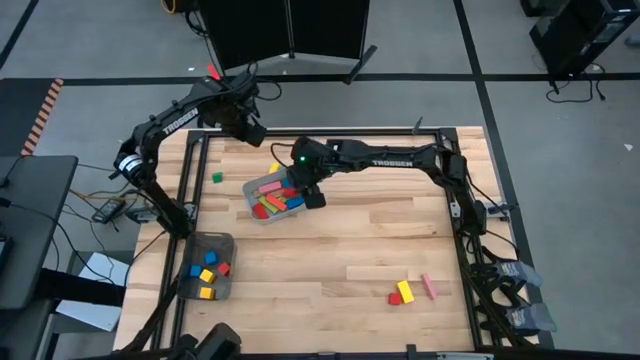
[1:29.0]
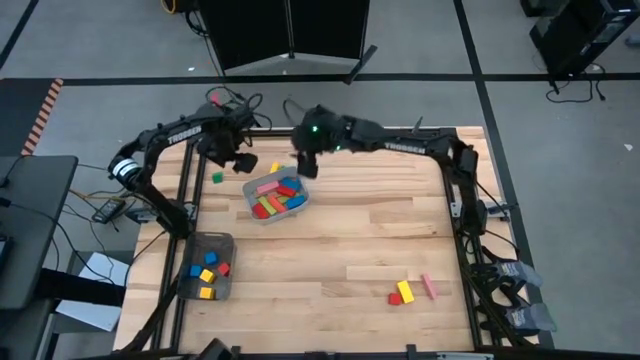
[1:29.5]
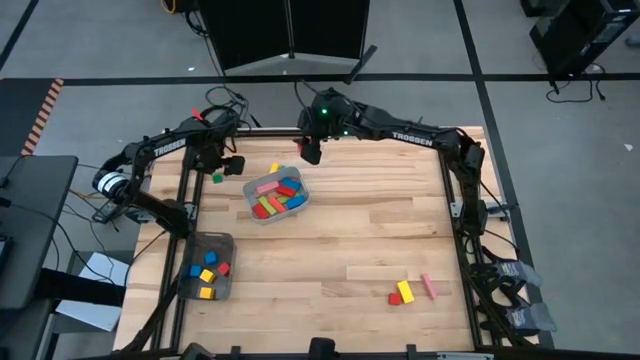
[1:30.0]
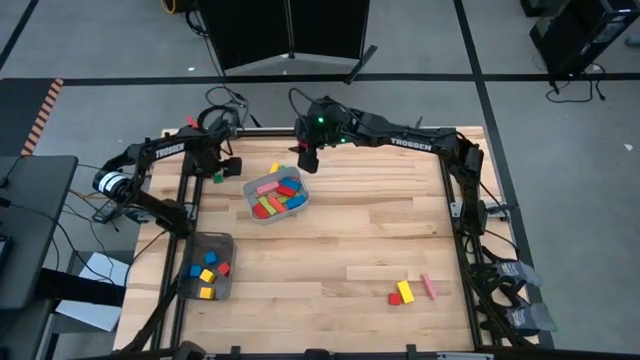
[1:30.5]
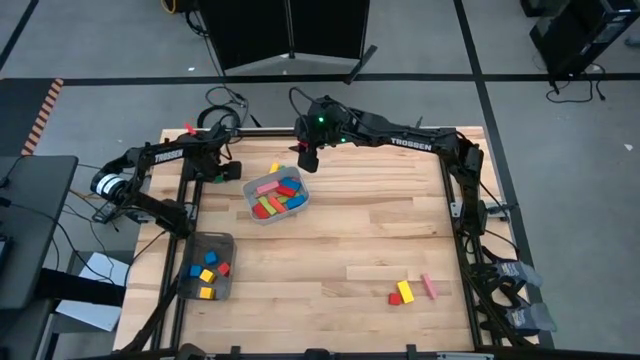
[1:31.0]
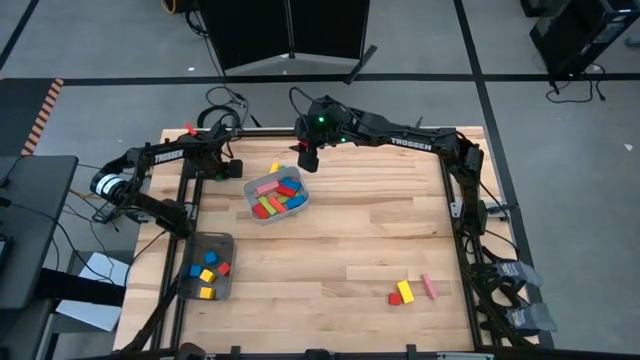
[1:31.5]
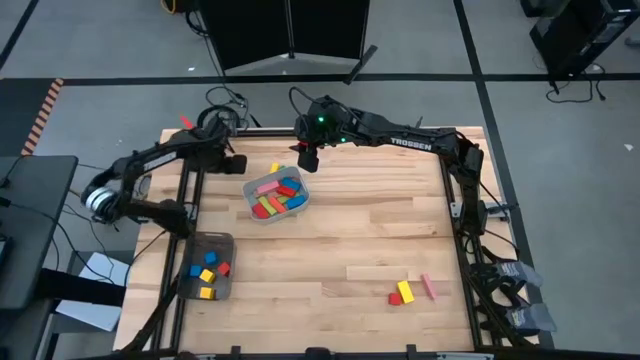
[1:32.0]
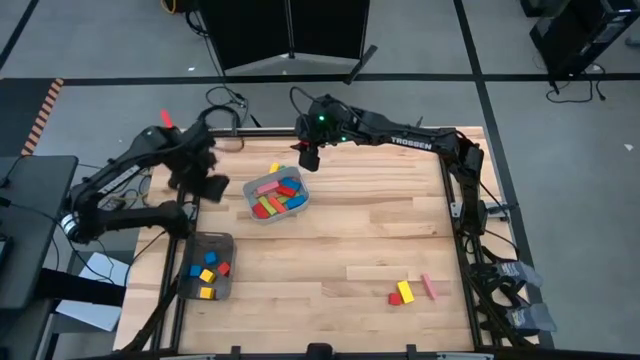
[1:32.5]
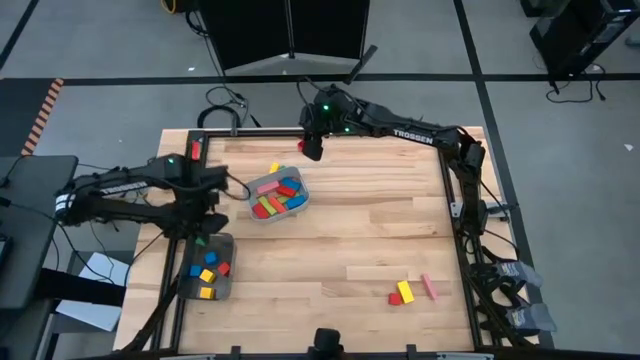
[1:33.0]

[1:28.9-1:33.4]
Task: Sort blocks by size
Put the green square block into the black bin

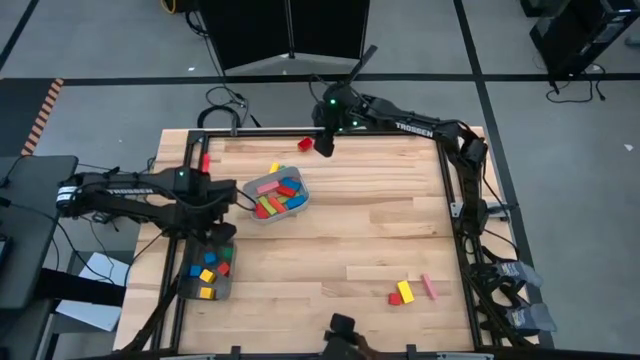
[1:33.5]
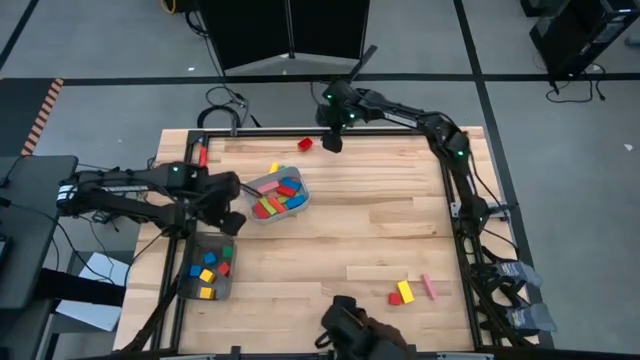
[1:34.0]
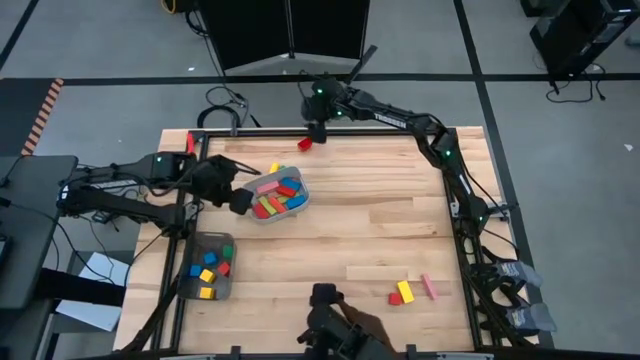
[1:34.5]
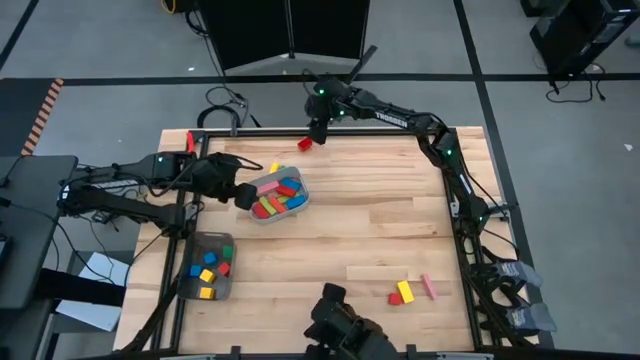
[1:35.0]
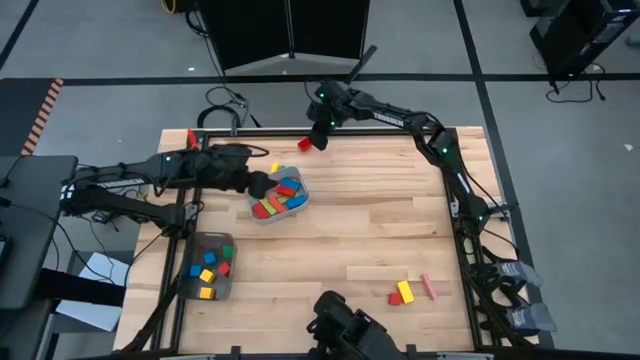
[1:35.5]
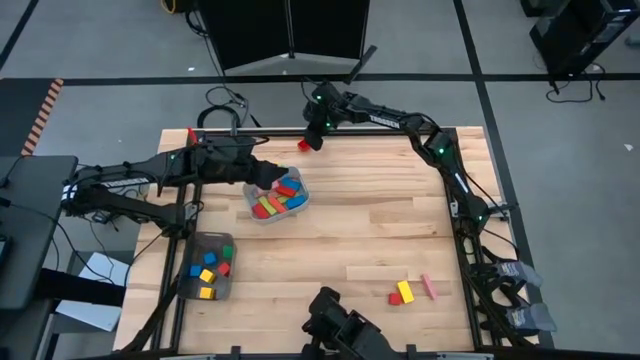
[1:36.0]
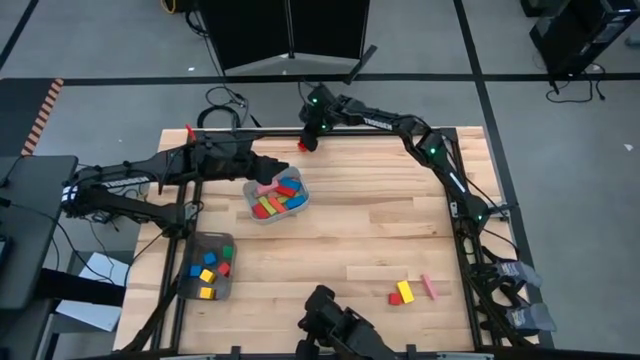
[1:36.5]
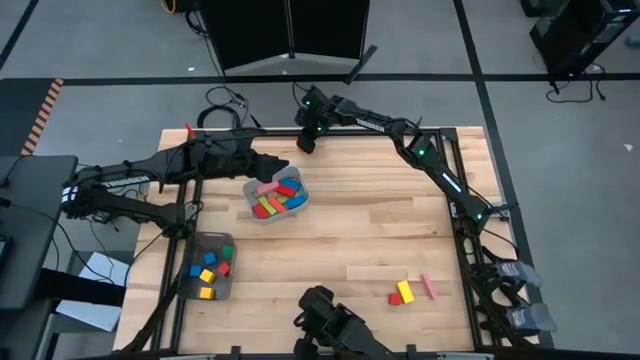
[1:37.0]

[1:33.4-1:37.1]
Adjust the orange game piece

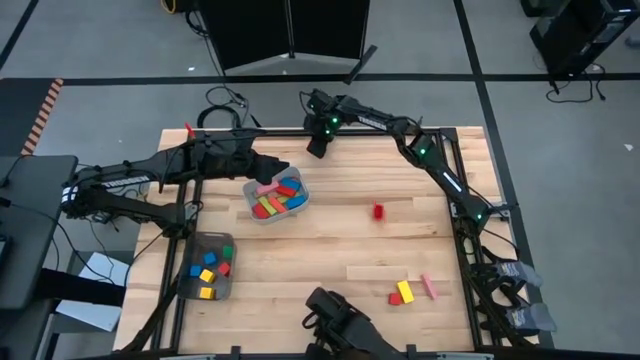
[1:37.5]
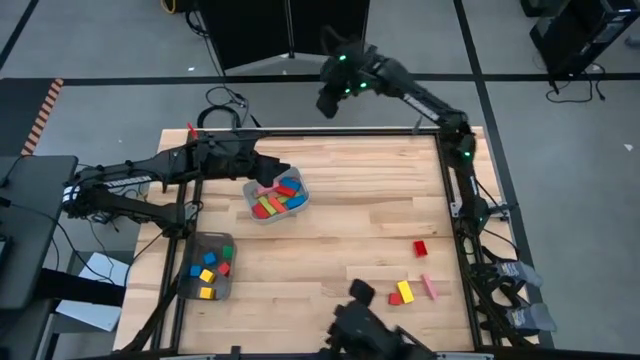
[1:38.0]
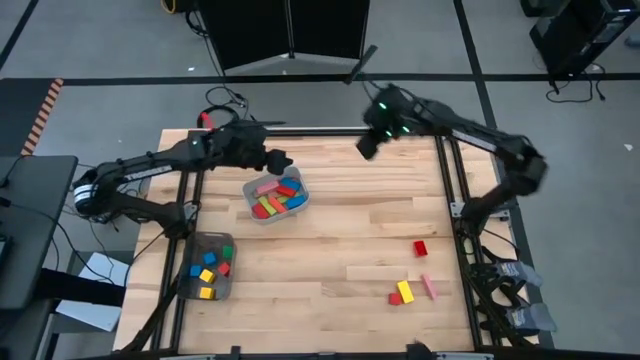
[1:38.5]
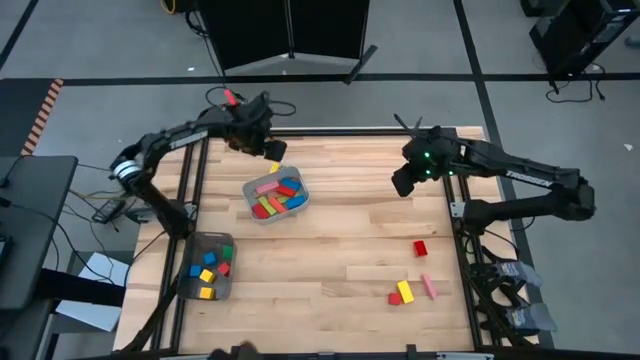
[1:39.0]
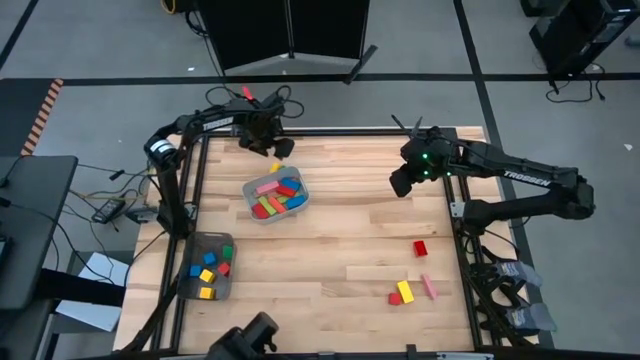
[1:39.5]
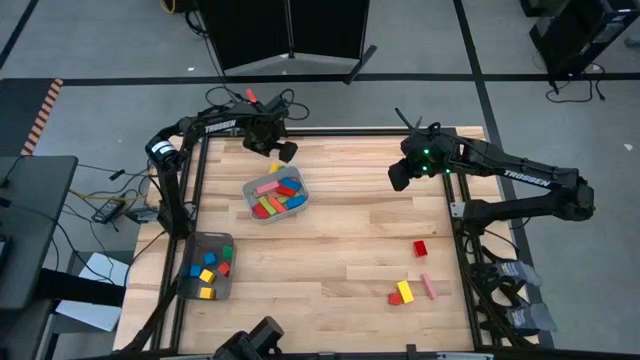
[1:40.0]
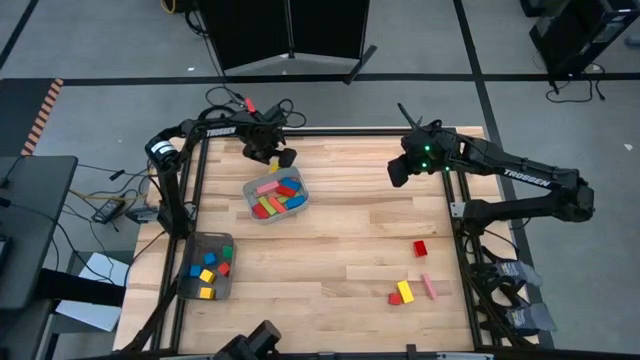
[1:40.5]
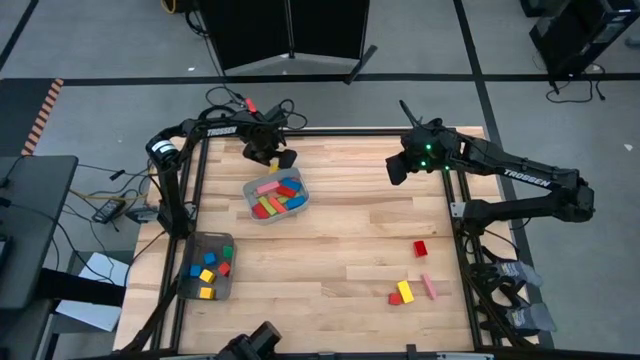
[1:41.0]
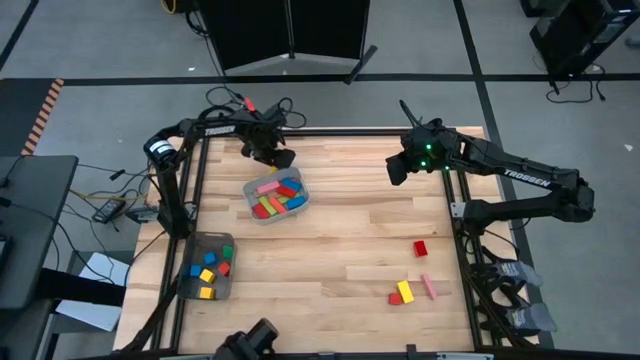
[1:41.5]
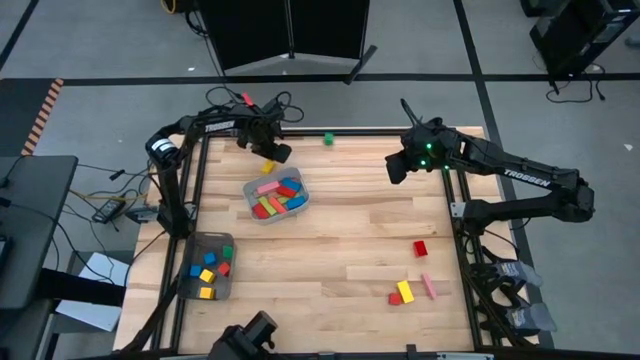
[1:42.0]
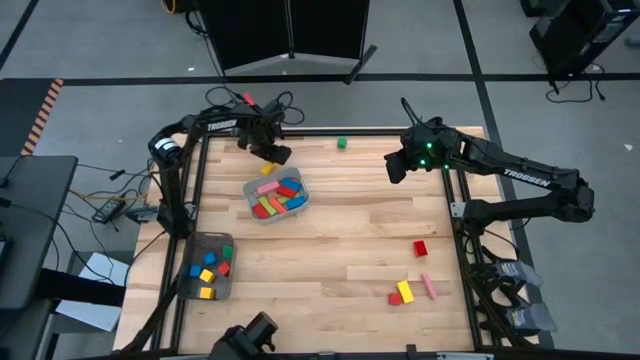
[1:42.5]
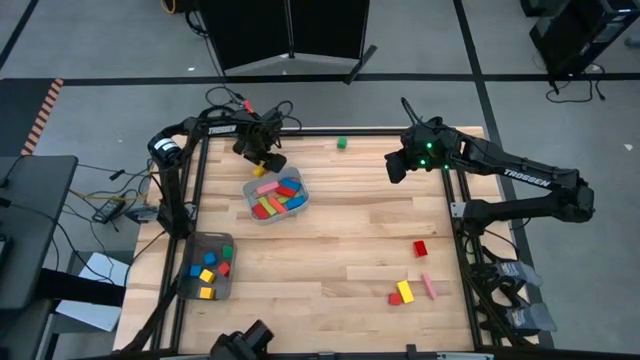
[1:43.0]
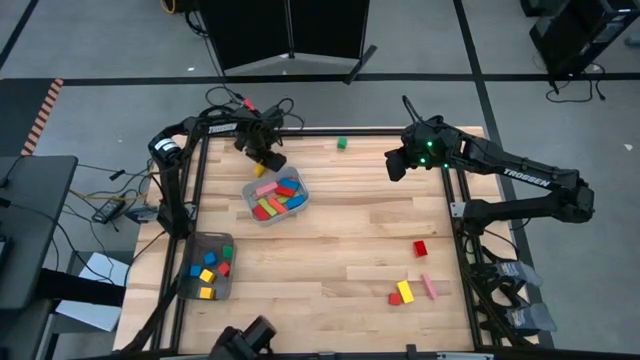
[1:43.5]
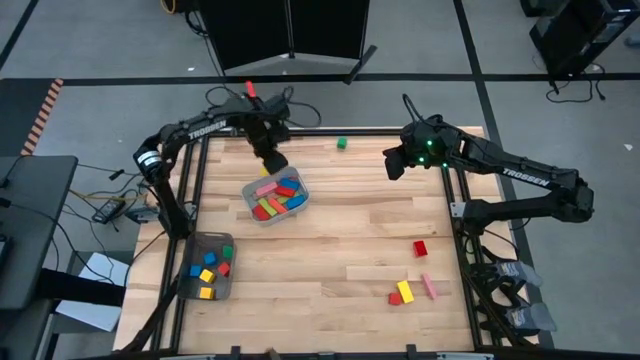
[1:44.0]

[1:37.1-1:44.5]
Put the yellow cylindrical block into the gray bin

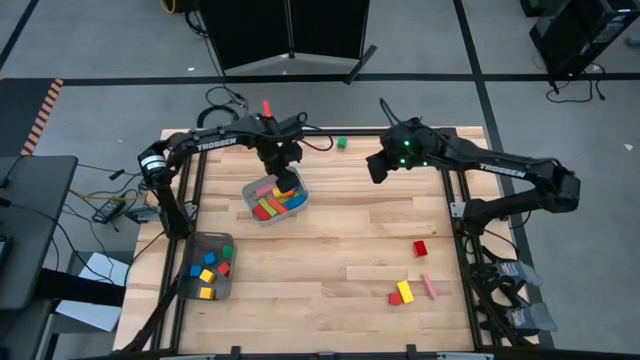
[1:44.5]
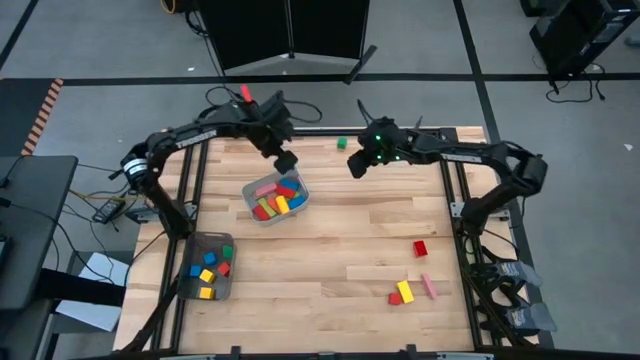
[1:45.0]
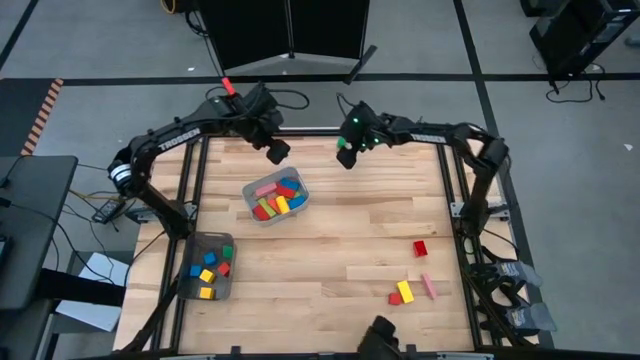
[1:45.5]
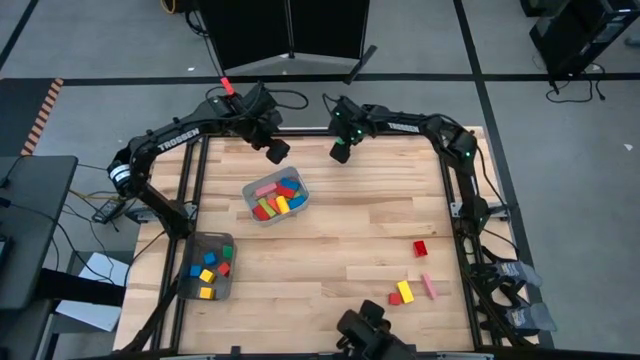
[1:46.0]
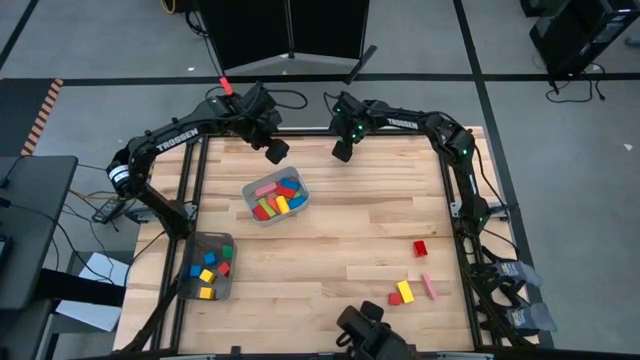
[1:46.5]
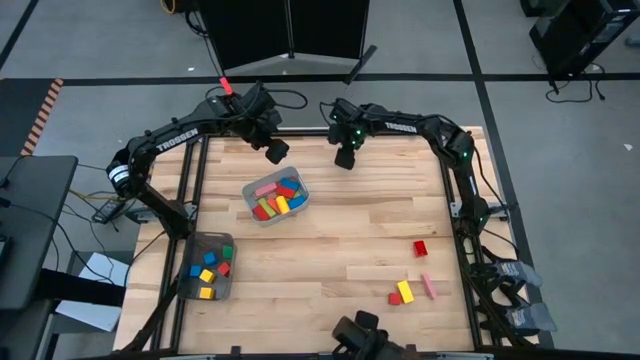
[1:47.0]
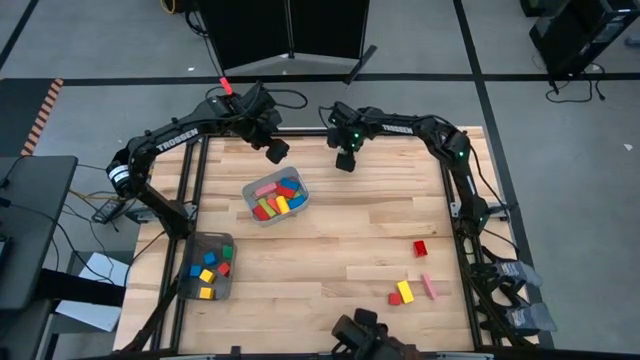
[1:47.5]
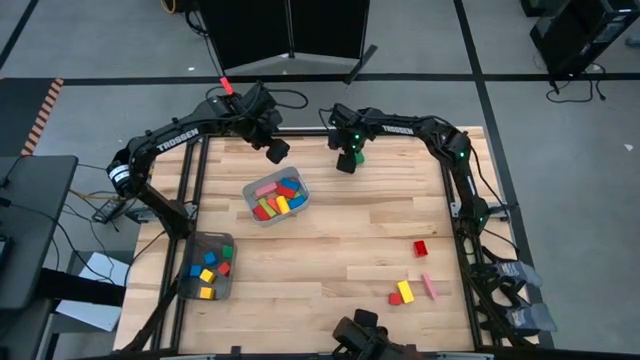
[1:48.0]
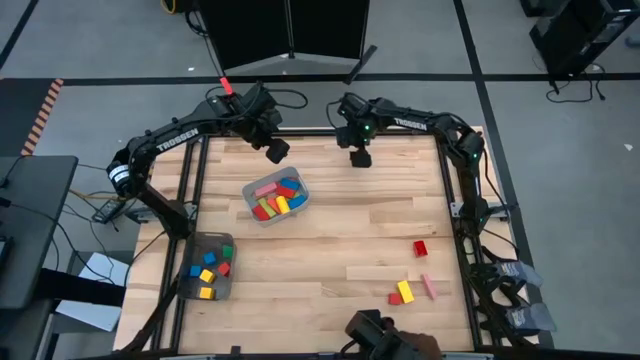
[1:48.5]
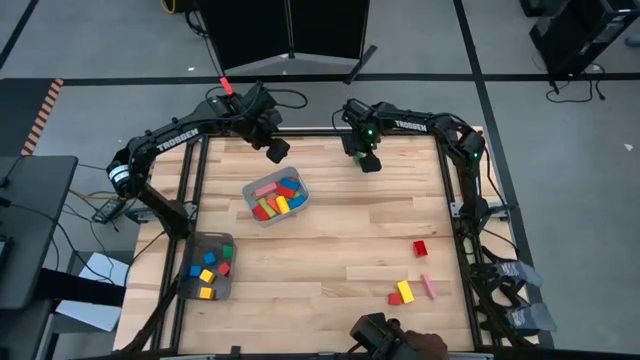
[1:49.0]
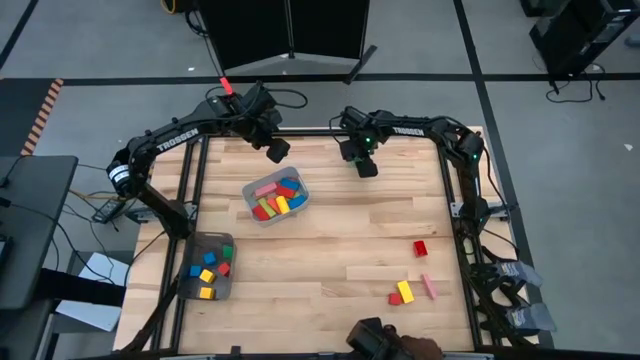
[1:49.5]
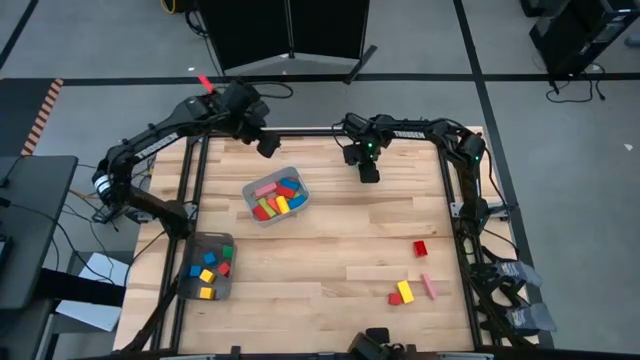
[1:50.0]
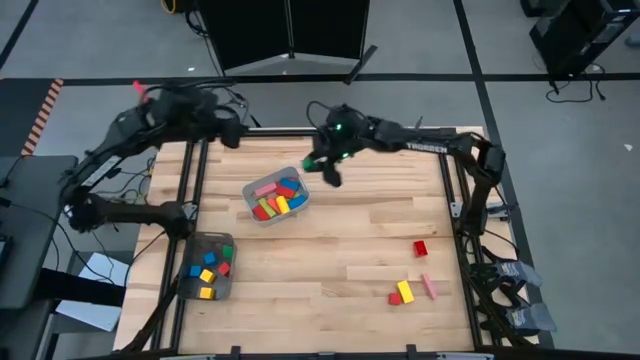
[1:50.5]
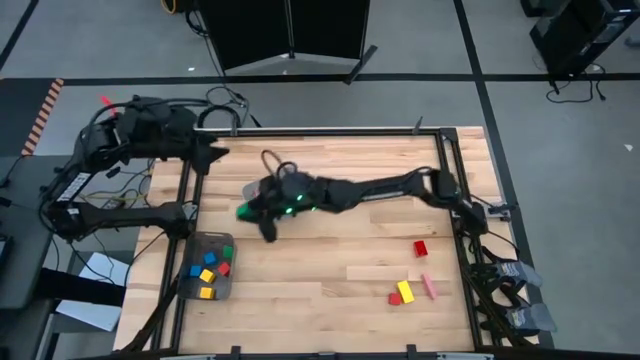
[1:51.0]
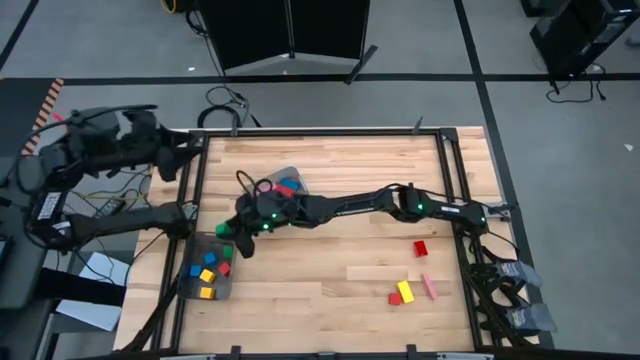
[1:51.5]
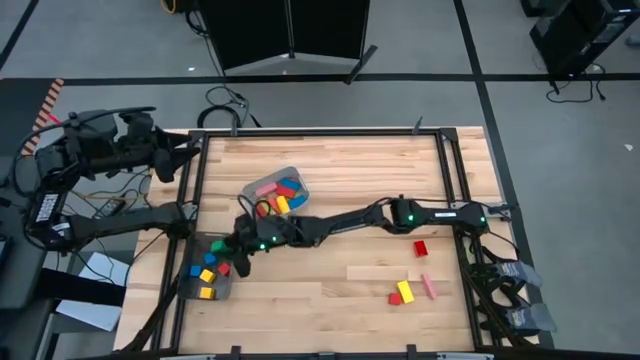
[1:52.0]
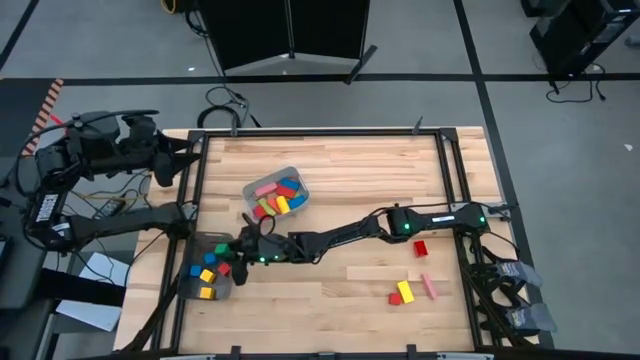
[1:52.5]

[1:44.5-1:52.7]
Put the green square block into the black bin
